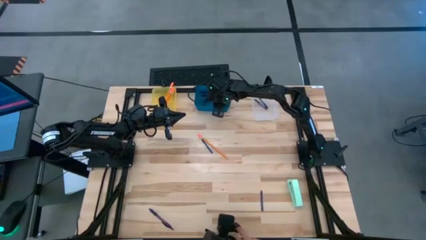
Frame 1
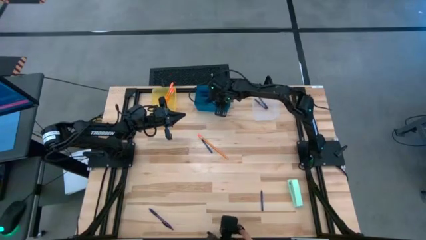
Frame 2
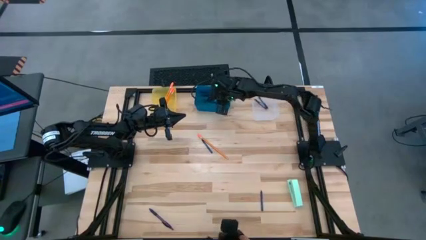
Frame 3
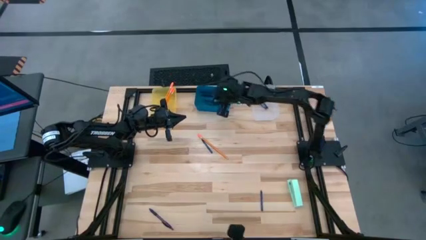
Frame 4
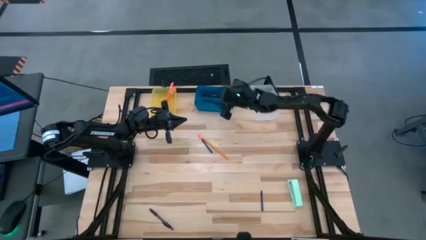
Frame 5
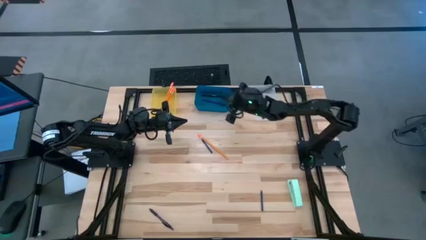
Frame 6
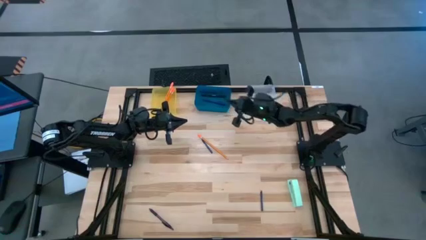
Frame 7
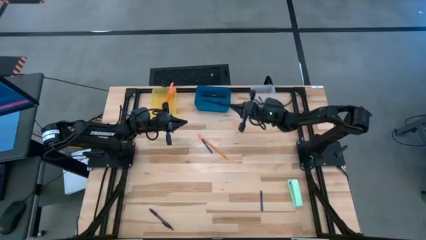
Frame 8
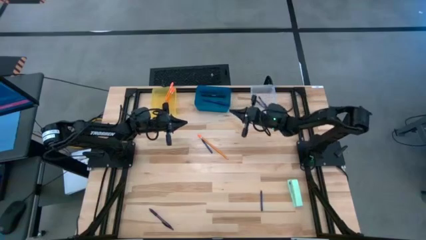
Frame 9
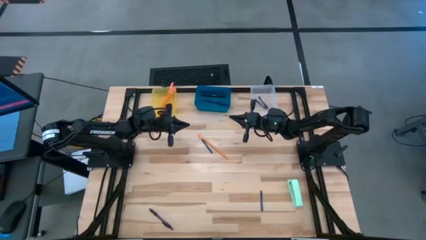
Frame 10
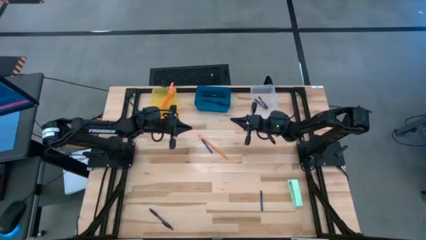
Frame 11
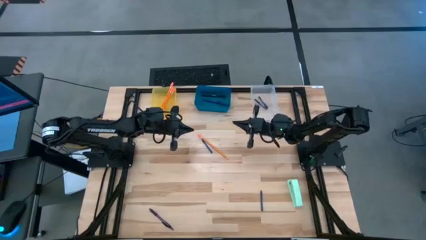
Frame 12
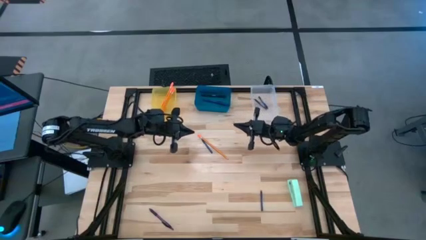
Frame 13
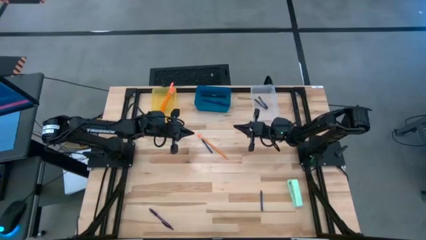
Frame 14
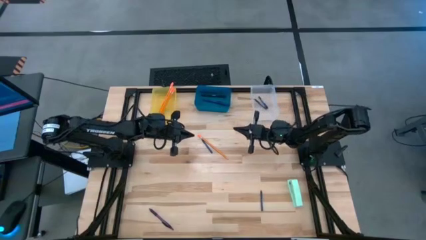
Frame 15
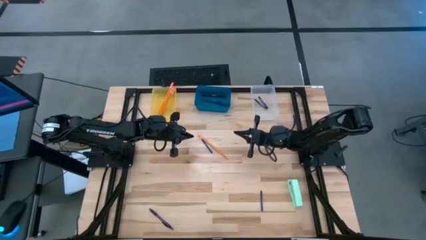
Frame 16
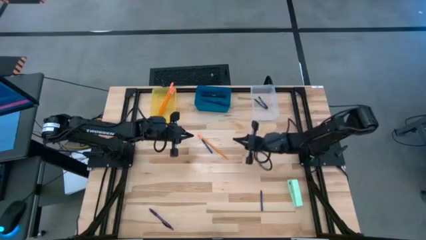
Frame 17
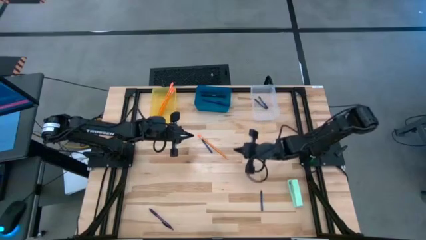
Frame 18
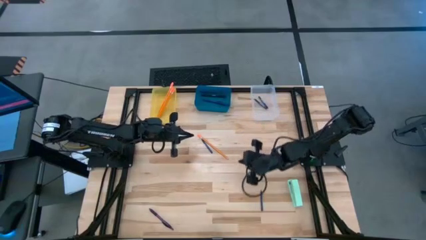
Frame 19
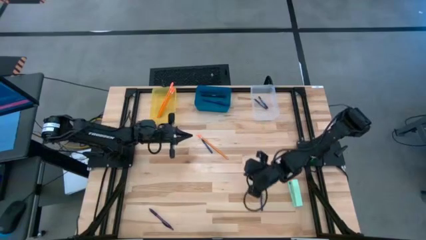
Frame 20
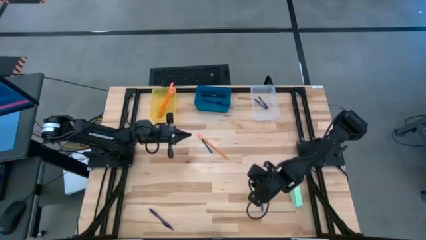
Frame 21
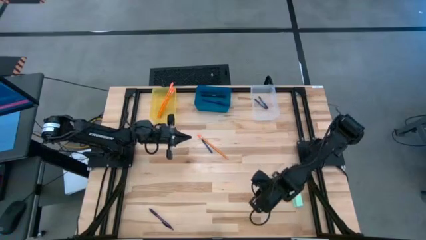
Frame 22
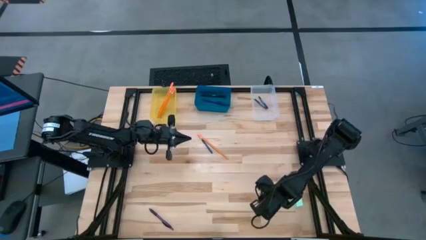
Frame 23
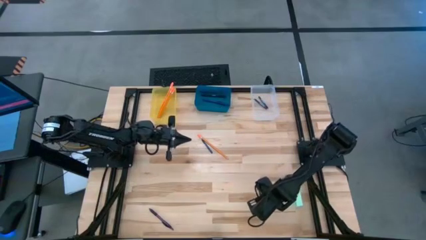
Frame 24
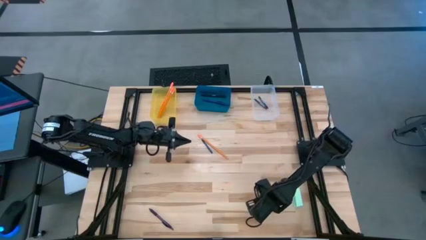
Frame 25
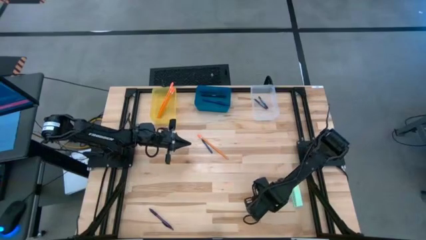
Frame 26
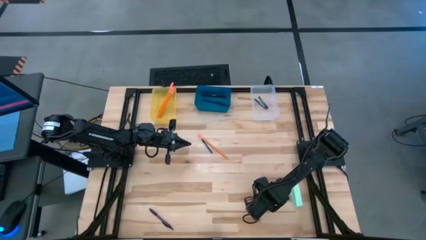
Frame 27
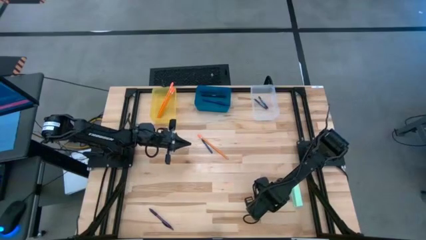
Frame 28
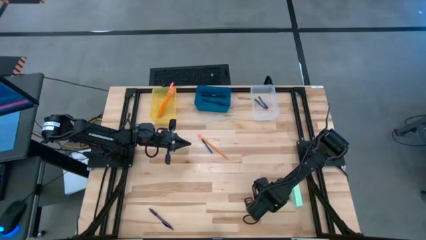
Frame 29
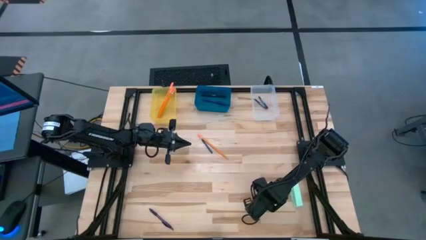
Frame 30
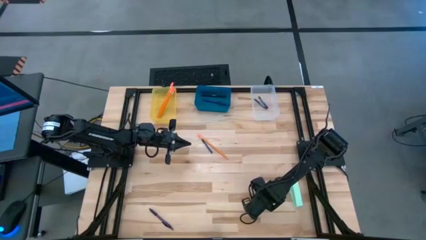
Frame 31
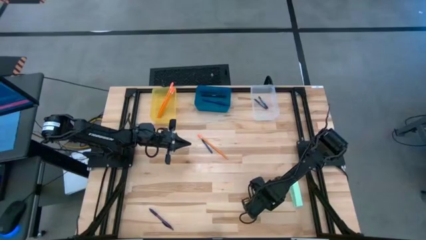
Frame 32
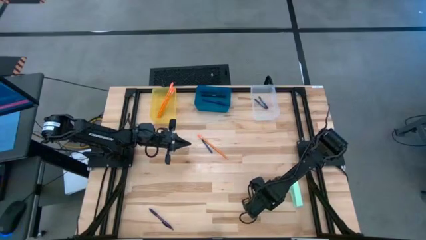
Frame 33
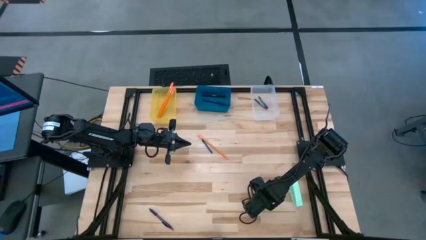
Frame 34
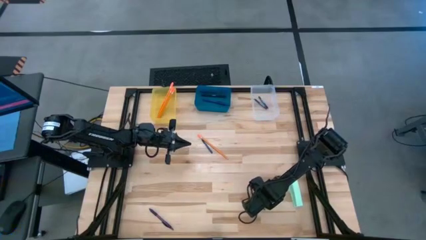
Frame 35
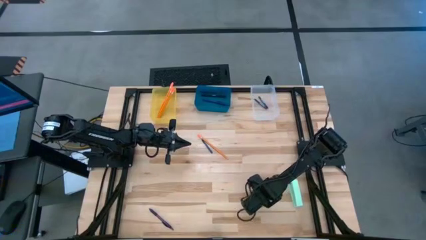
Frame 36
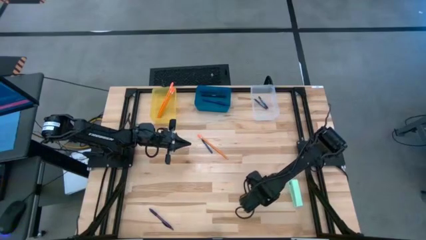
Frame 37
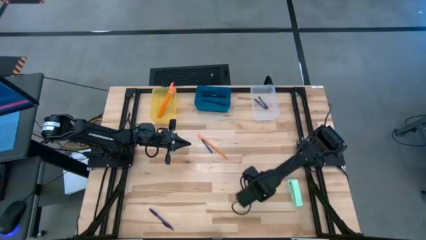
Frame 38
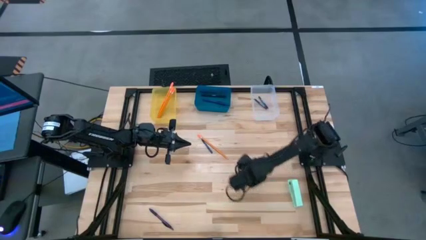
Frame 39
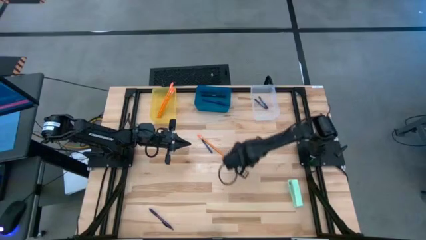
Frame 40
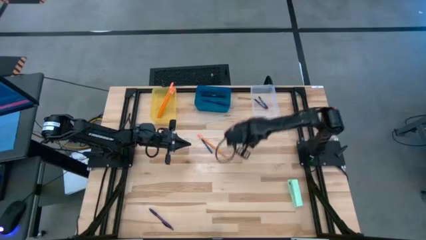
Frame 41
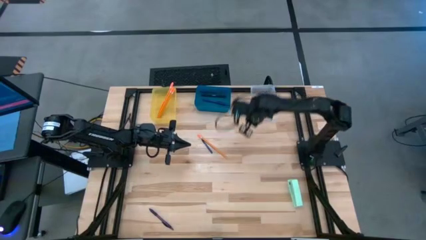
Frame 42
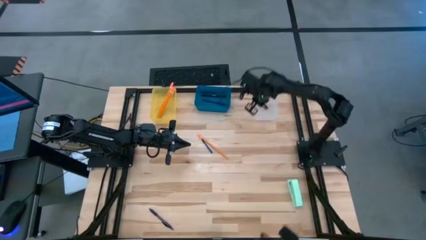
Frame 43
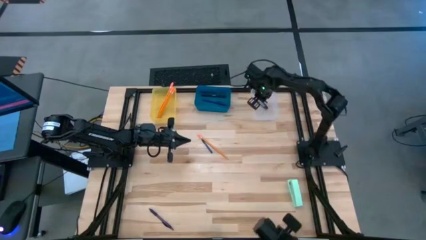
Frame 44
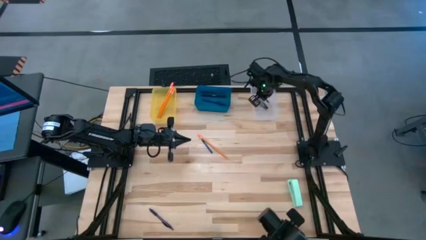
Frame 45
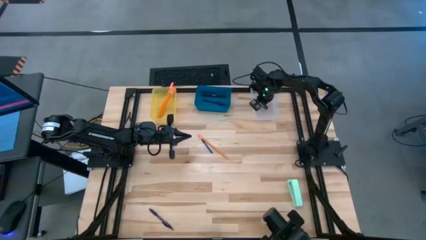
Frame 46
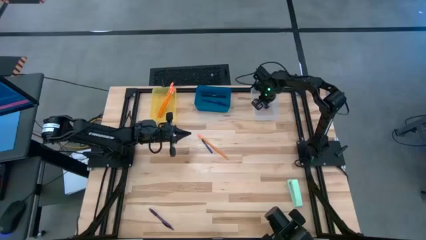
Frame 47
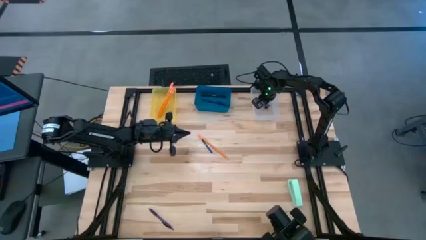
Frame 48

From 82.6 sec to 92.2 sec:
Task: Sort crayons/erasers/pens/pencils in bins
Put the blue crayon into the transparent white bin

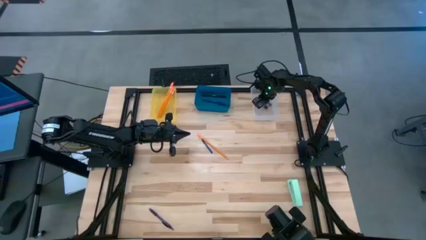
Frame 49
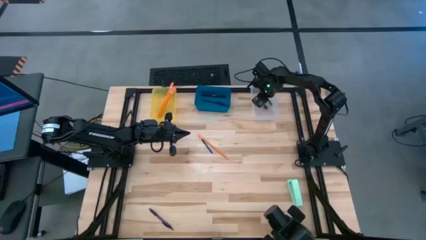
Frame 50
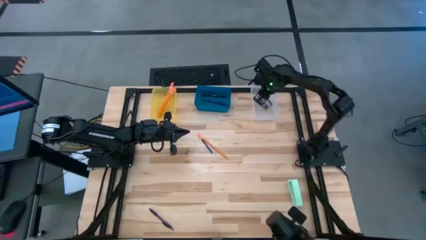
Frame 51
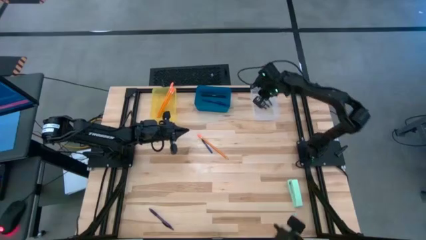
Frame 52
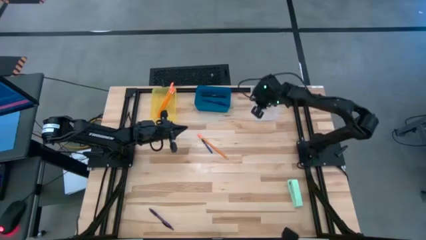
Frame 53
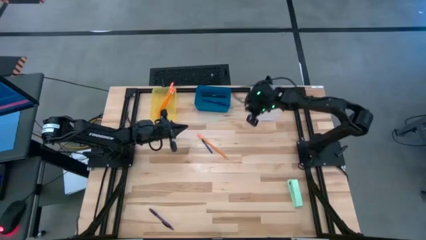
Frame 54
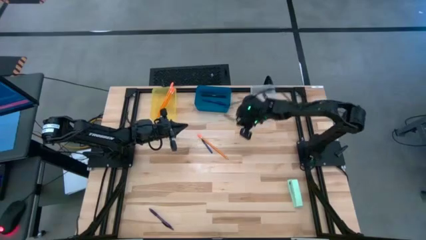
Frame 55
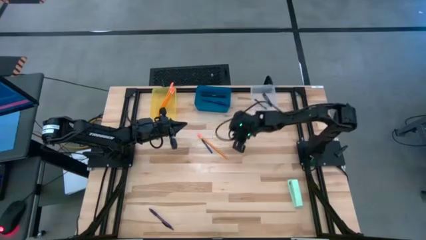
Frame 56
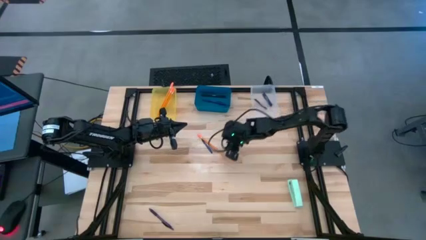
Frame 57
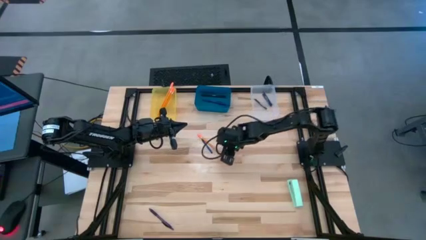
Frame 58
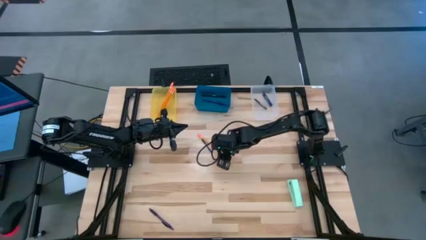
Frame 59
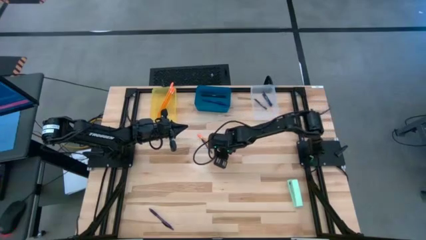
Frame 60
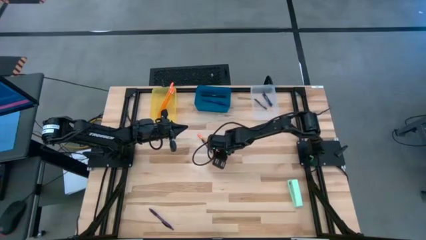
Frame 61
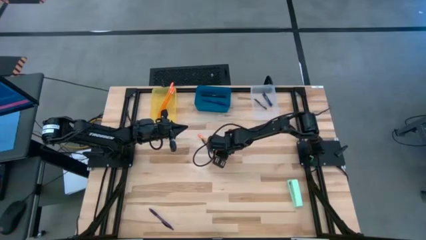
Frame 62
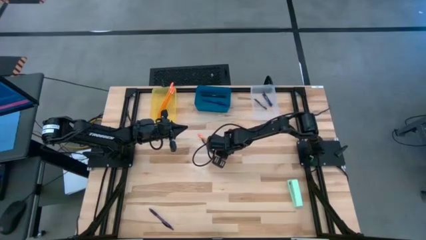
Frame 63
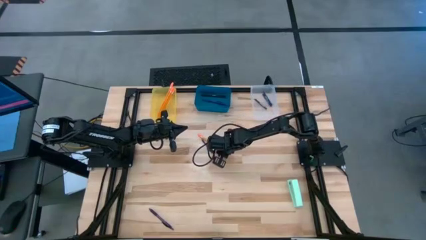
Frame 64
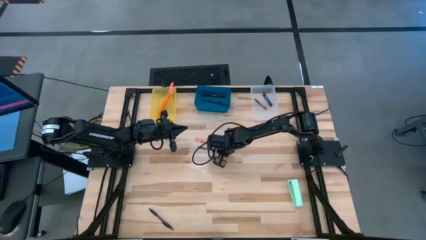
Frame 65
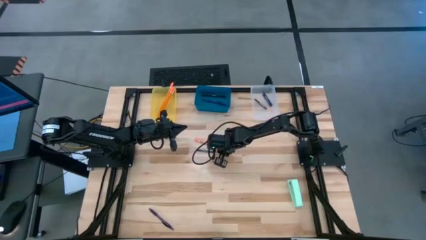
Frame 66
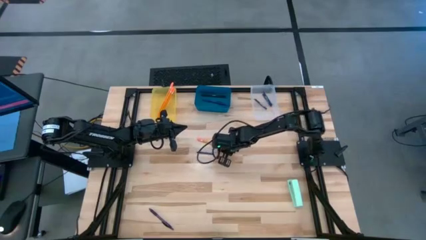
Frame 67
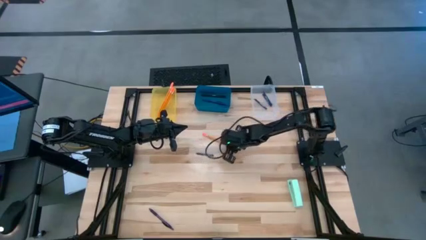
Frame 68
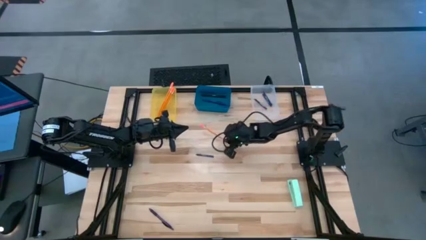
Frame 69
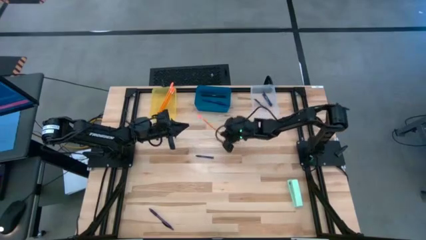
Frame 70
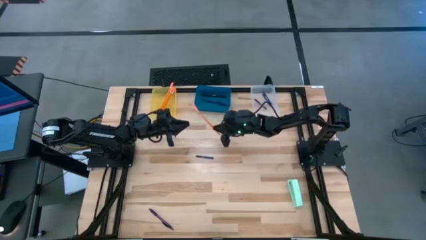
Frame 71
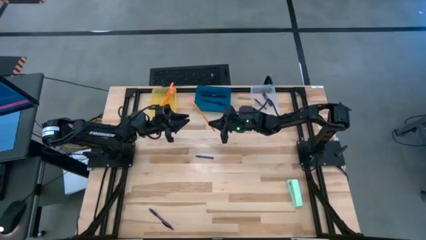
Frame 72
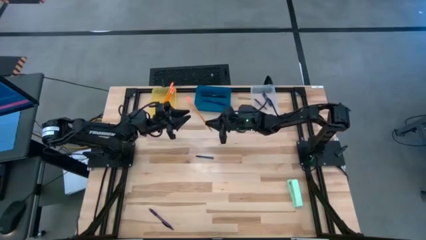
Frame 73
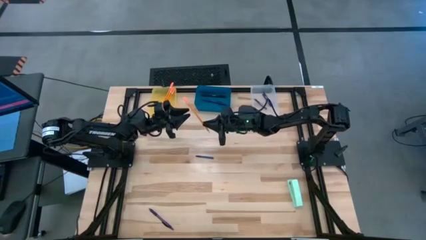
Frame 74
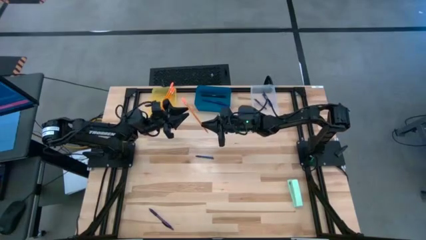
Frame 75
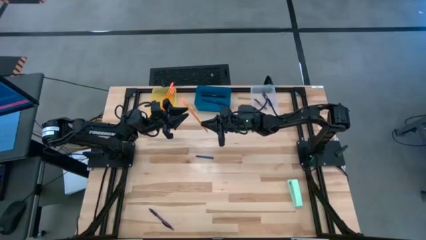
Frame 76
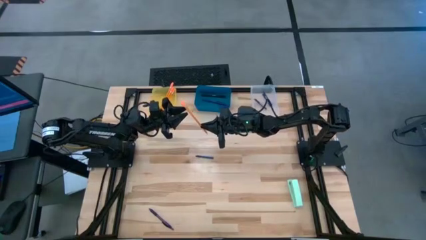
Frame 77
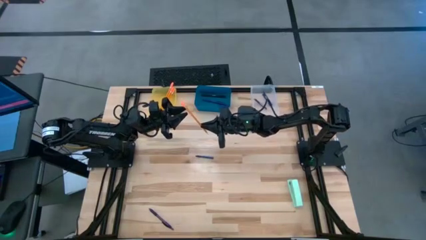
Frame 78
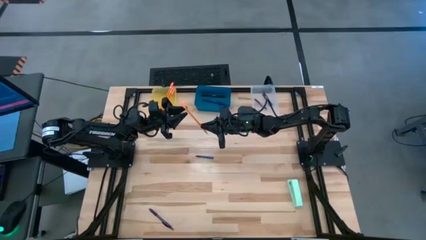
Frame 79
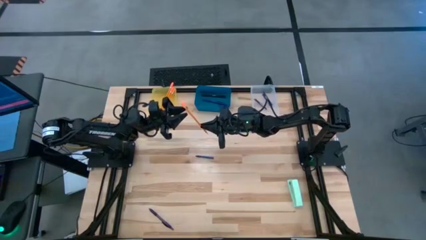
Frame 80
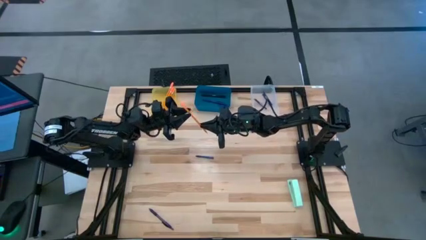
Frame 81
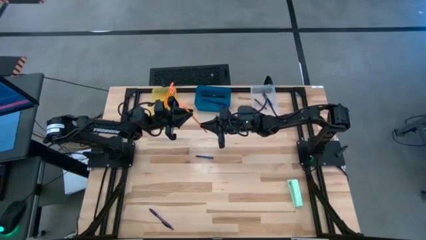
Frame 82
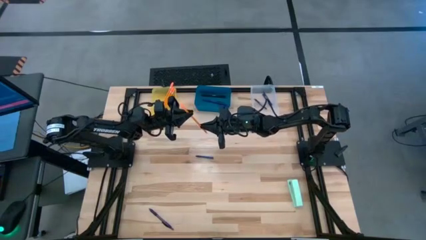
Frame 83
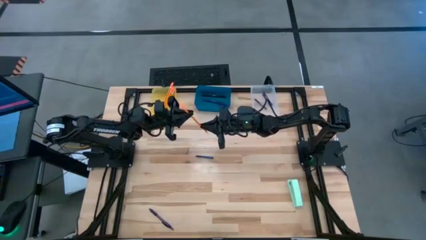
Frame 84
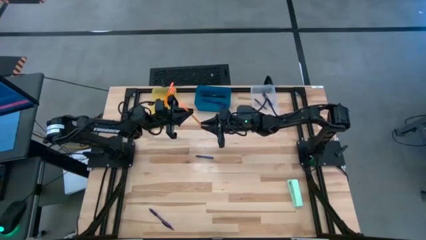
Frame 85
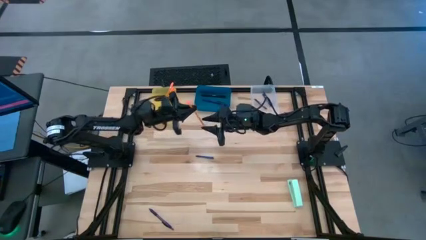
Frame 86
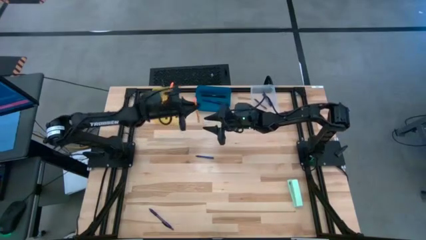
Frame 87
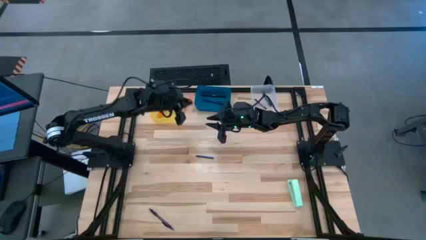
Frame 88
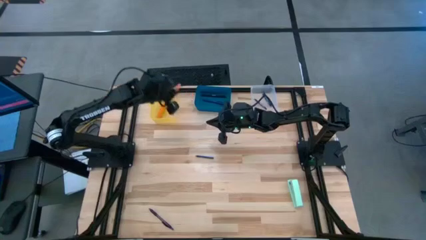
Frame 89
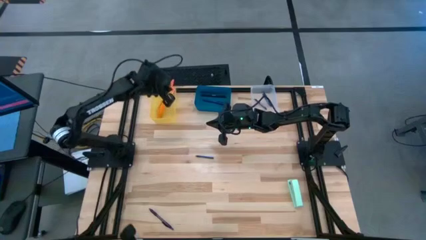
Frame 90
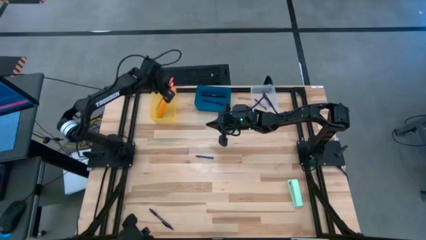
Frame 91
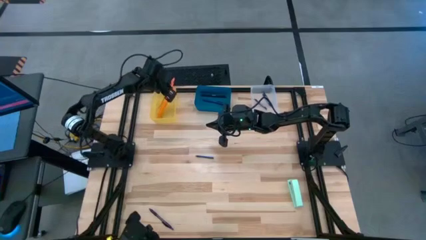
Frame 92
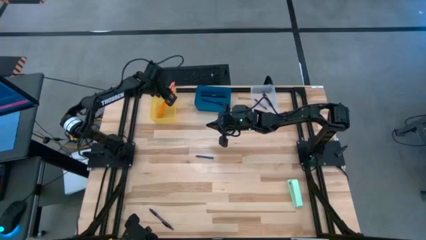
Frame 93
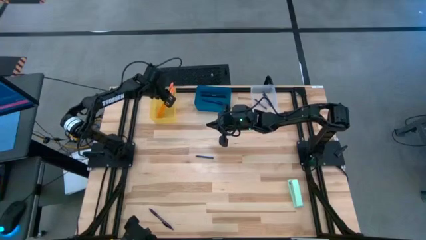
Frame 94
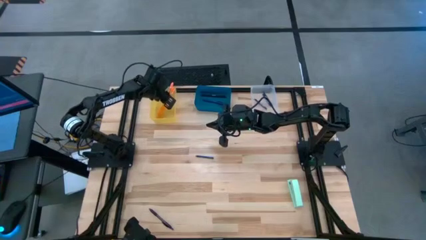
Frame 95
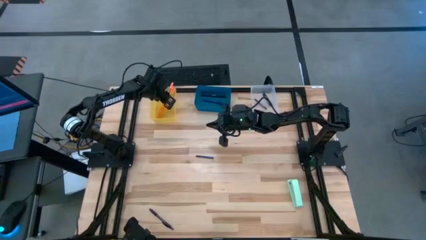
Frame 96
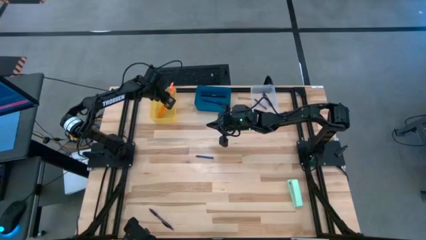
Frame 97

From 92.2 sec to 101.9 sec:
Put the orange pencil into the transparent yellow bin
